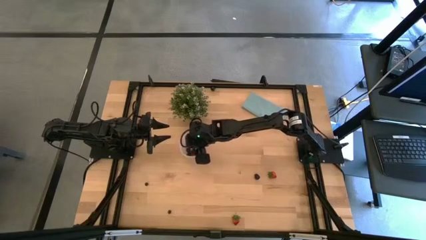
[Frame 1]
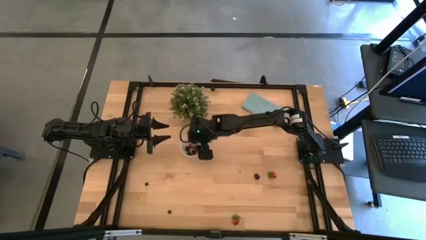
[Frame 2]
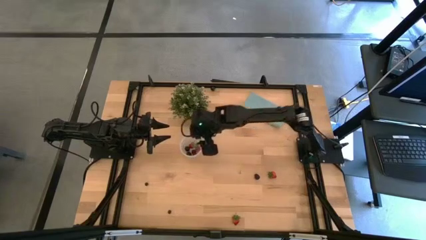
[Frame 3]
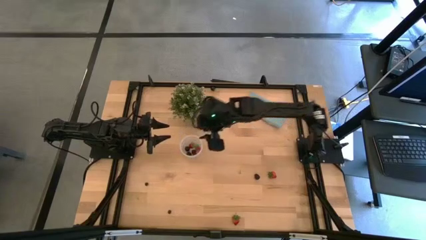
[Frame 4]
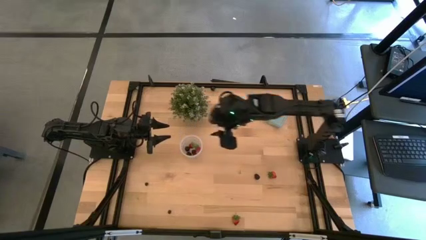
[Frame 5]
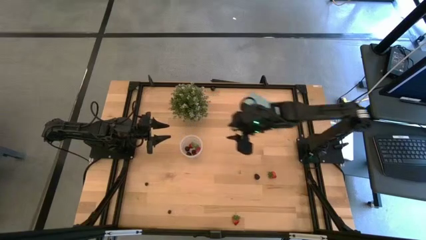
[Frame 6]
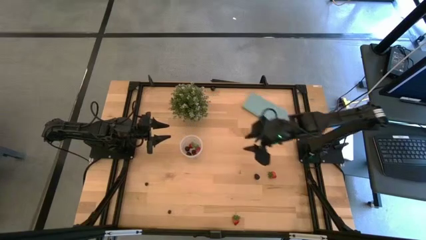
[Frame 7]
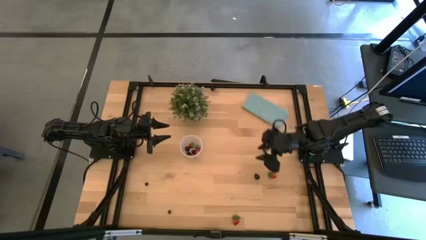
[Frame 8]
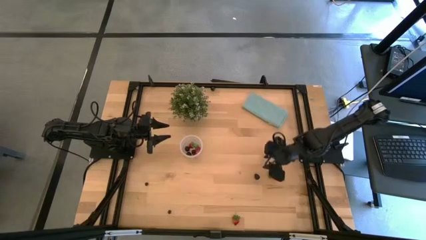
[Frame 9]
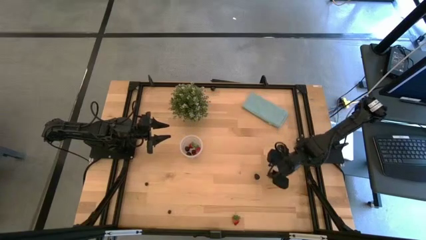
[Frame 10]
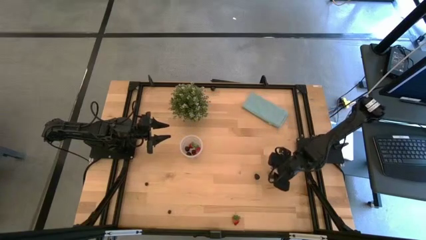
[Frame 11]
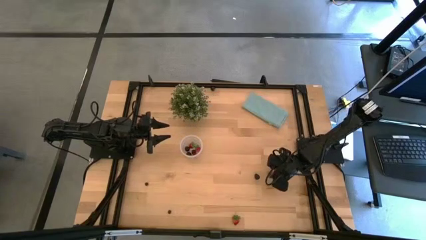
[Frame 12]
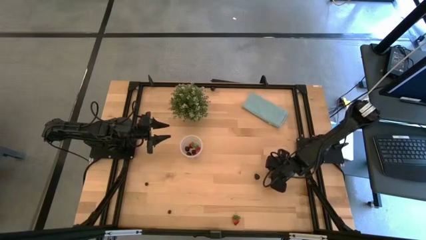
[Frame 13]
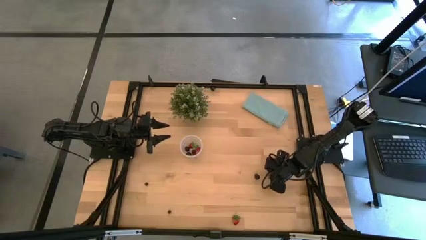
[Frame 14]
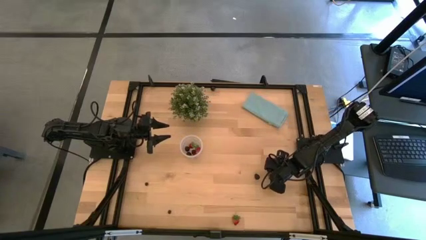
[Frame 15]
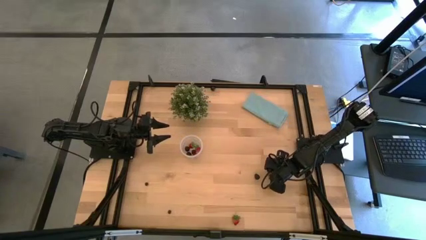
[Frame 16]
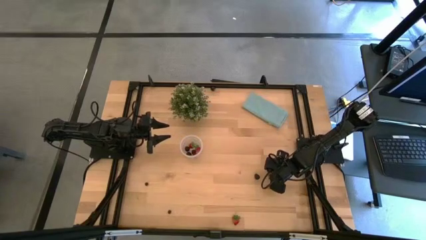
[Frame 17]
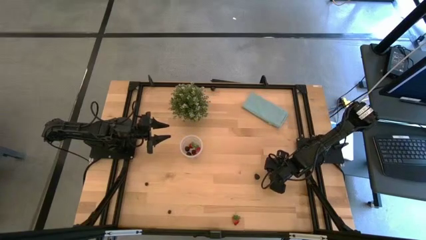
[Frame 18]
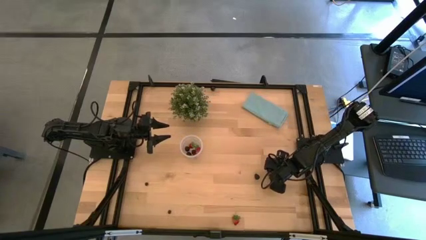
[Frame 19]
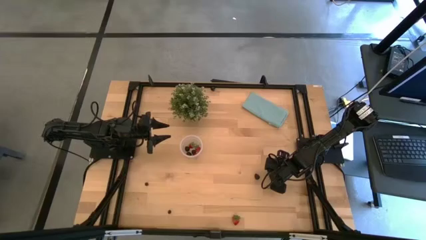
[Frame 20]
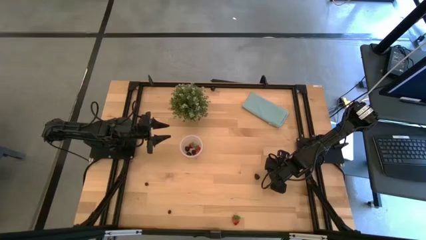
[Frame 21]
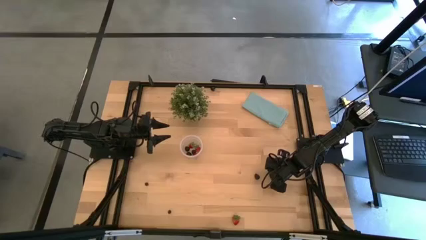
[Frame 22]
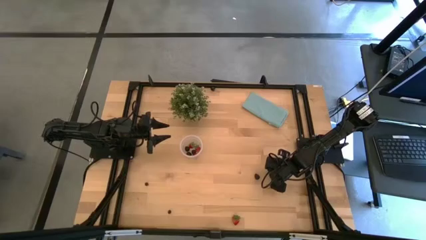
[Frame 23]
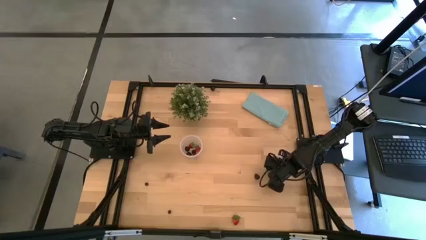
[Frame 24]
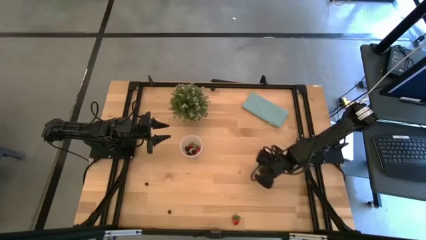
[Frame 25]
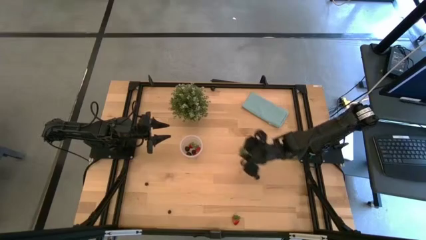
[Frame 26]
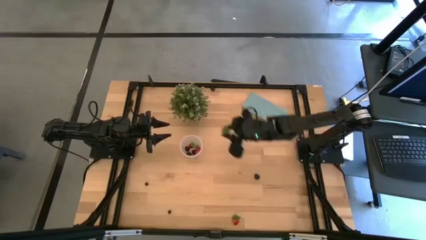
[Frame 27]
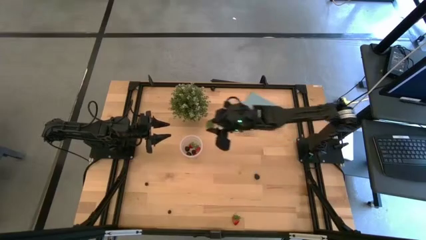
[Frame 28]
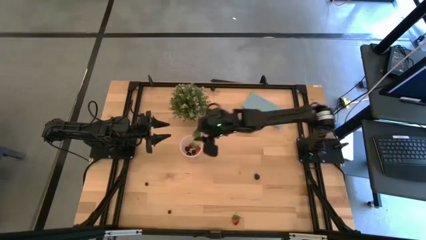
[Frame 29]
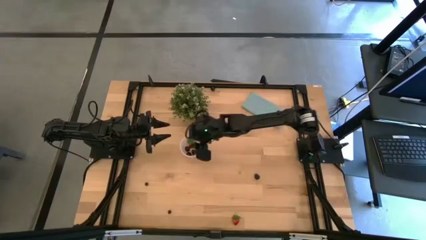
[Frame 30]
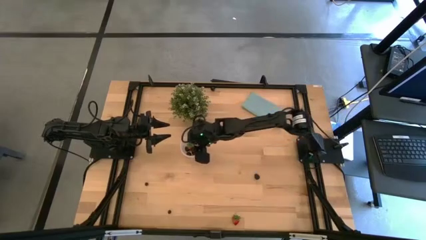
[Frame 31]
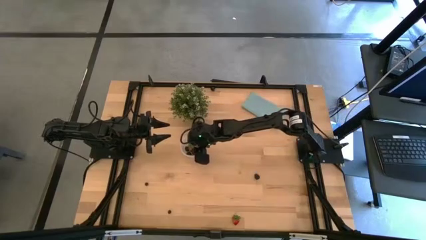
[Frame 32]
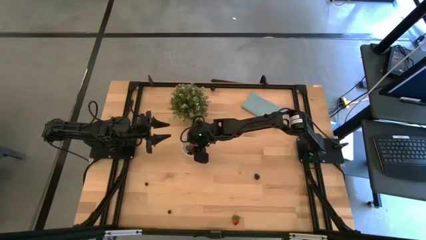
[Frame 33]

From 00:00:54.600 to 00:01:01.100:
Task: Pick and placing Produce into tupperware
Put the red strawberry into the transparent container

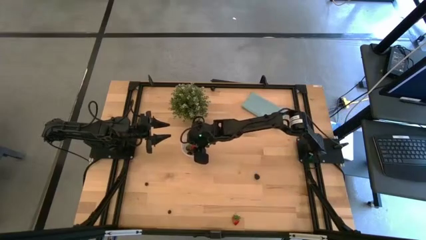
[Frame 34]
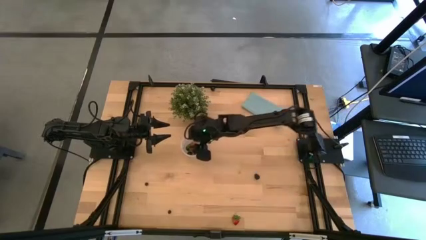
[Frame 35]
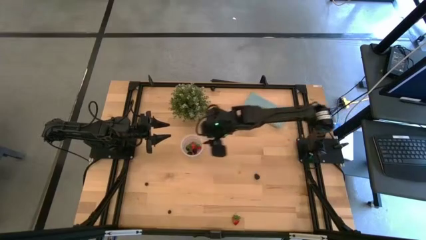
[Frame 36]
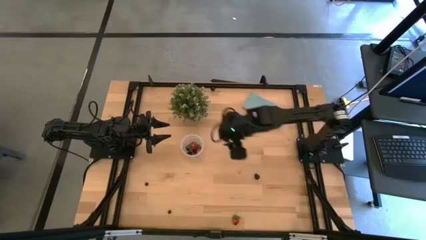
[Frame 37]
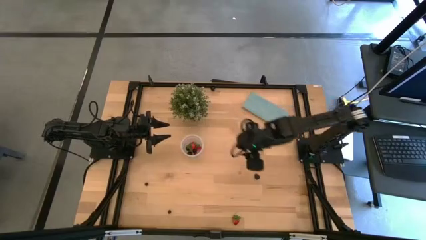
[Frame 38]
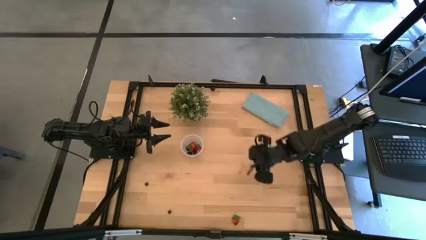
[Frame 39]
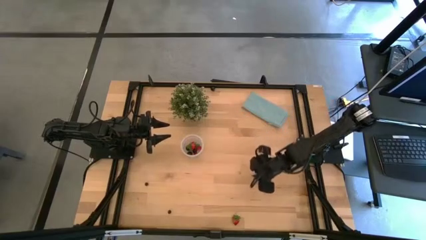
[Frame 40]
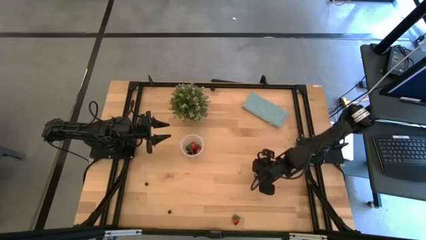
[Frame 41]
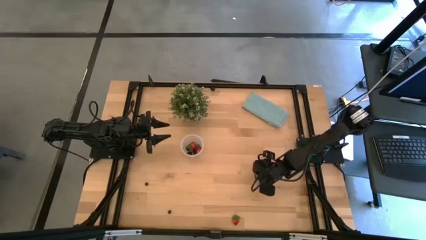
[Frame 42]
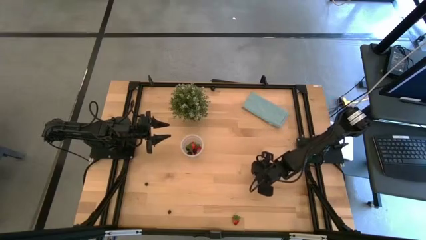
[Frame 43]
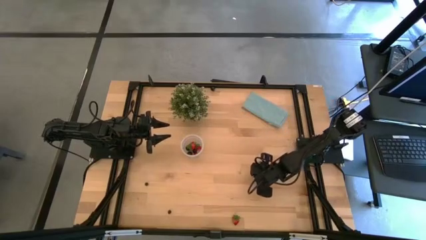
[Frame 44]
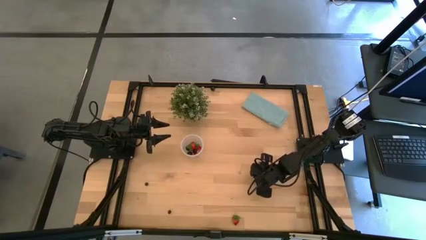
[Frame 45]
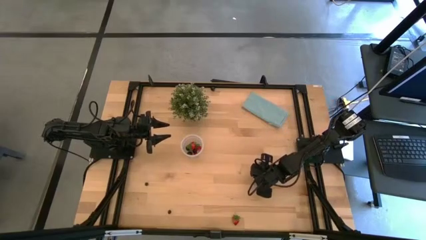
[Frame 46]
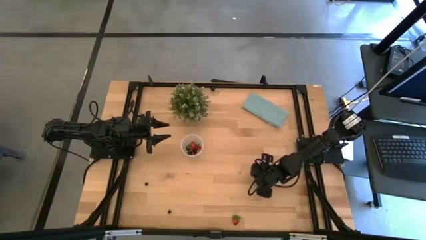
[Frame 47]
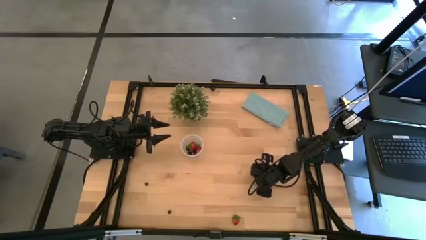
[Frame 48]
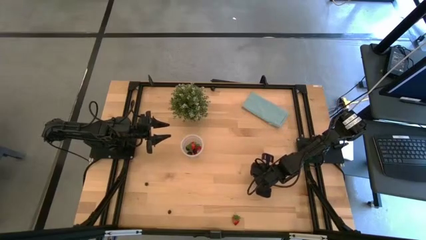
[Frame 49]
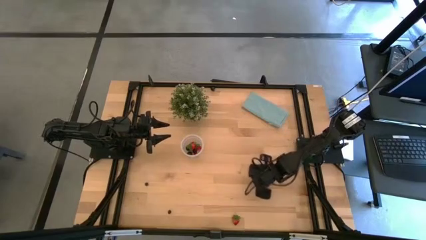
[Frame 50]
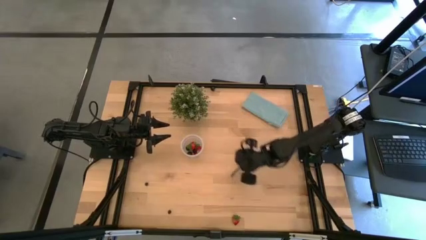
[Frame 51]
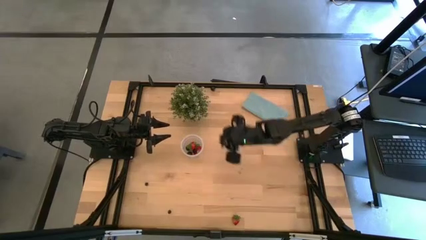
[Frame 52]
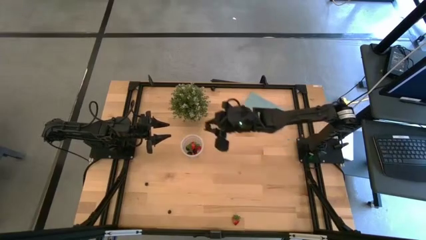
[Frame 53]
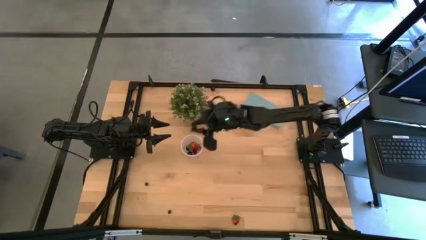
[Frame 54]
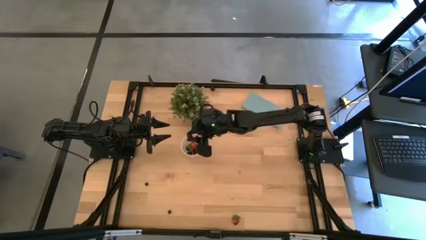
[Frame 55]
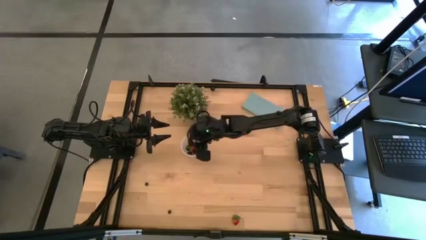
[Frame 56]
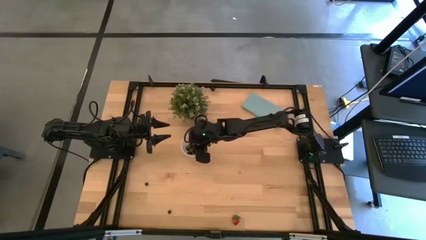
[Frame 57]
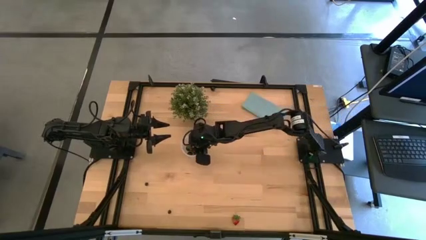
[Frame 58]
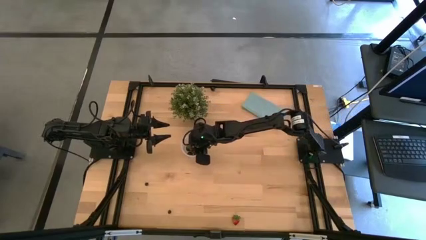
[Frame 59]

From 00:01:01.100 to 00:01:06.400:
Put the blackberry into the transparent container

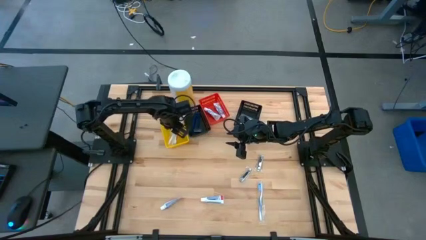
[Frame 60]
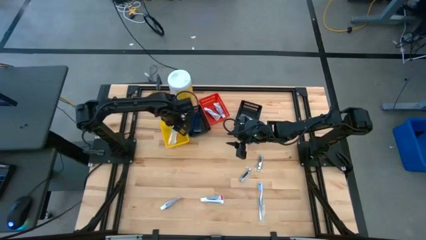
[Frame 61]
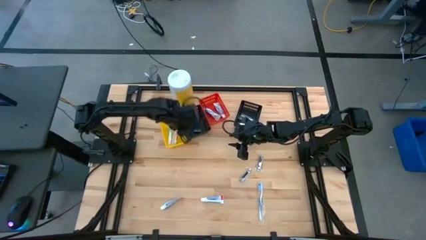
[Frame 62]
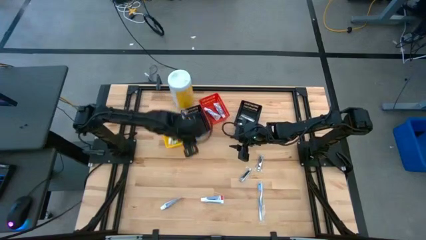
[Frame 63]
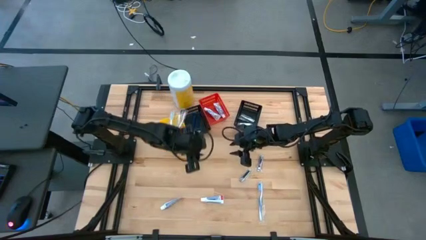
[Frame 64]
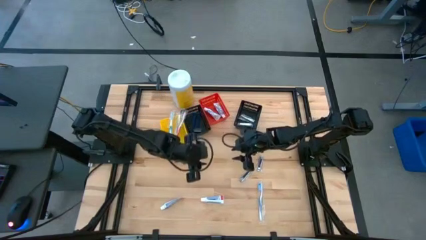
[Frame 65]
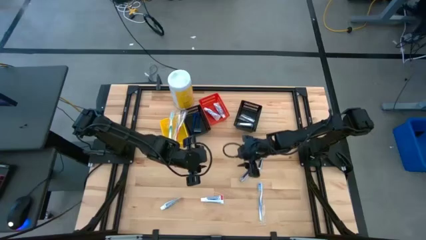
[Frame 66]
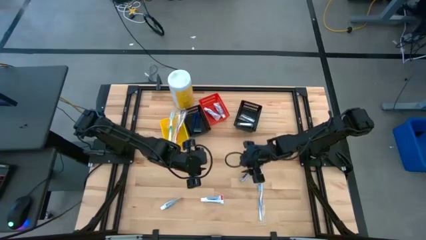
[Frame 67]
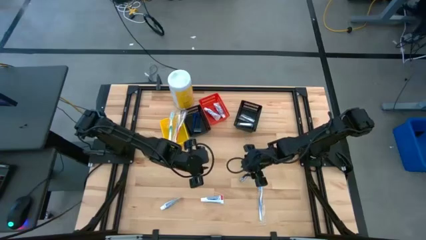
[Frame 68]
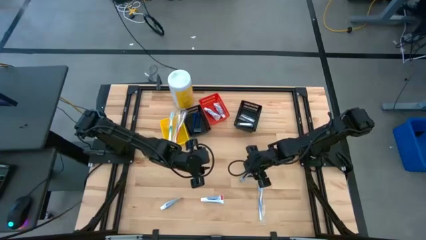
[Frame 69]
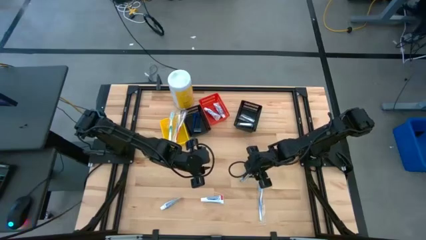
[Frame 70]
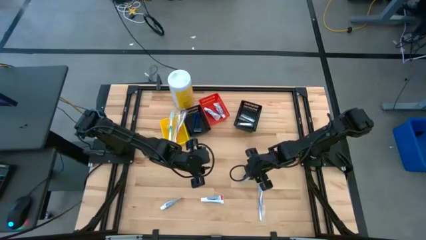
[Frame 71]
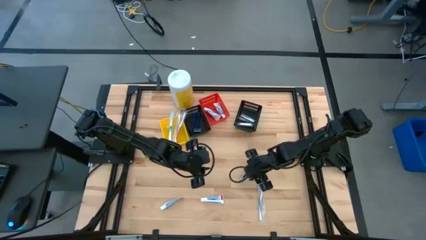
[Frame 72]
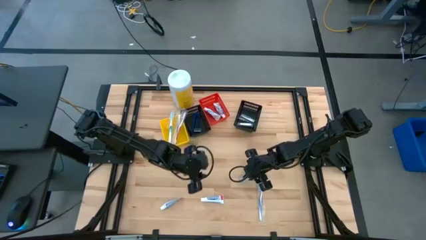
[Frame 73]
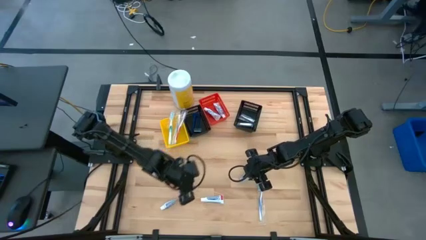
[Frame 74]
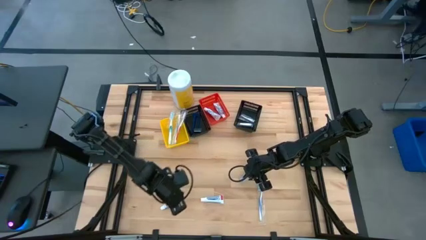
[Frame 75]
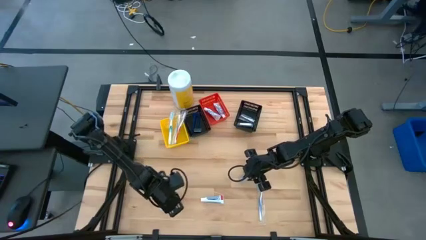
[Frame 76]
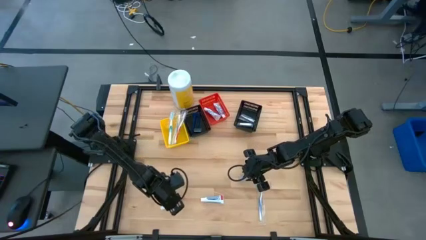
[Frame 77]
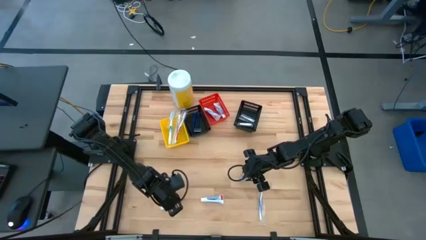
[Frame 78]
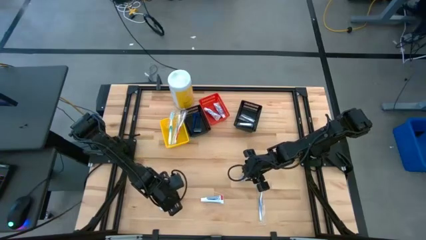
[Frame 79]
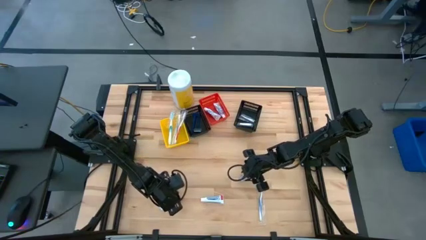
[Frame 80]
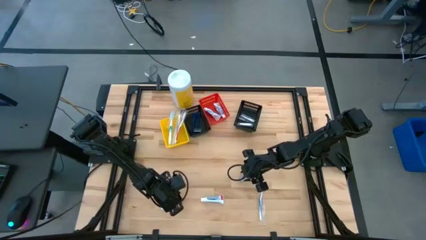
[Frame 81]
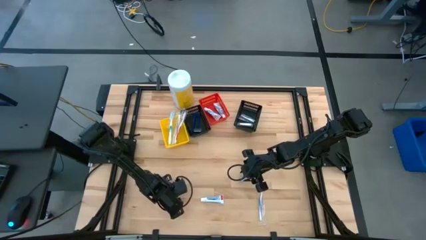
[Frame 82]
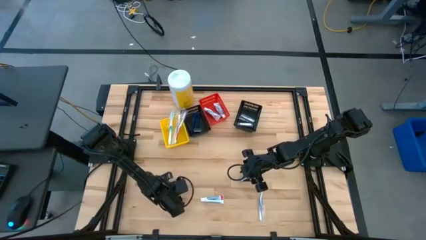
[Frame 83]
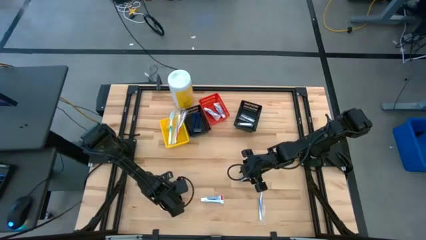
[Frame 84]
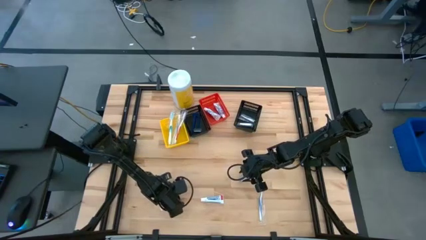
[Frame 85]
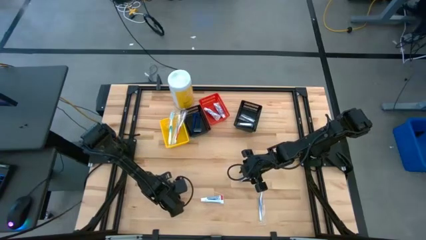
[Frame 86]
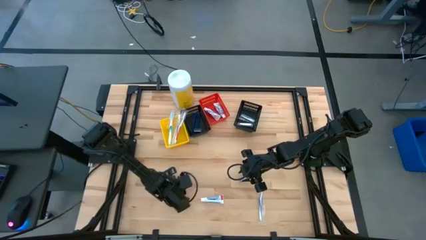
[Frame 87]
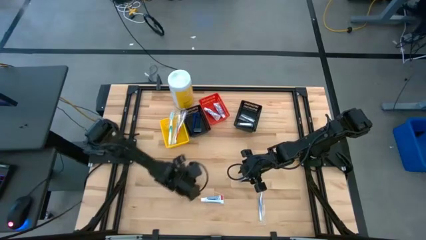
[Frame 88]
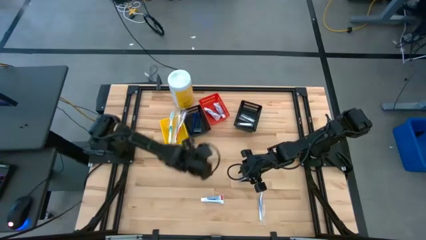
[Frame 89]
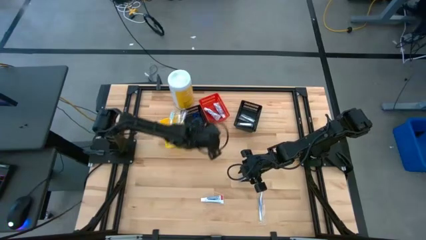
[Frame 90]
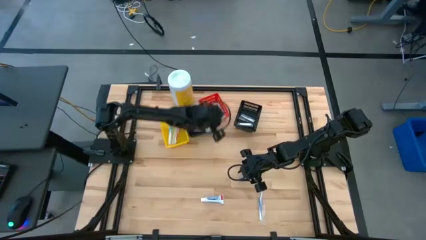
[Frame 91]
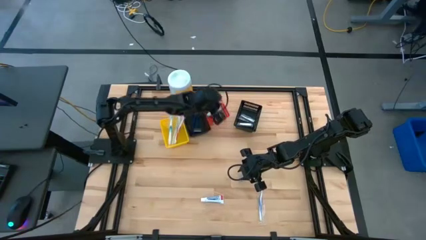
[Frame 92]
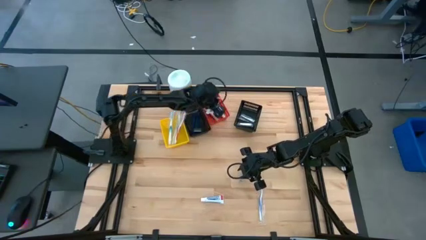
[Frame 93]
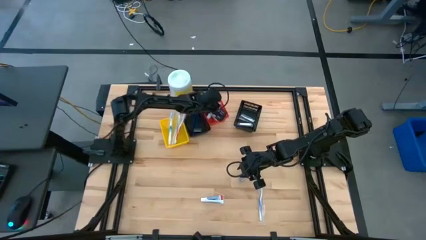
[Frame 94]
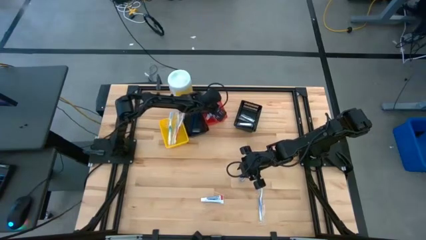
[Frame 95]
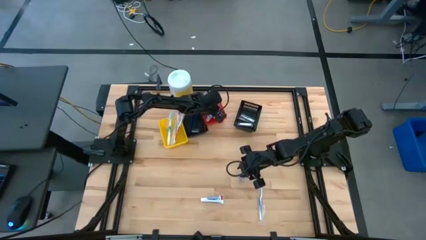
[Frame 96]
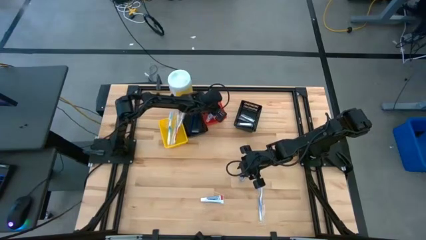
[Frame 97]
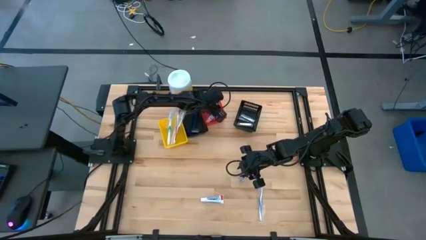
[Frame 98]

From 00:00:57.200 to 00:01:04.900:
Task: Pick & Place Travel size toiletries
Put the white toothpaste into the red bin
